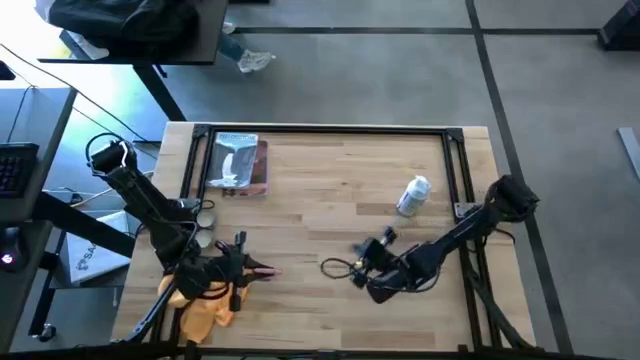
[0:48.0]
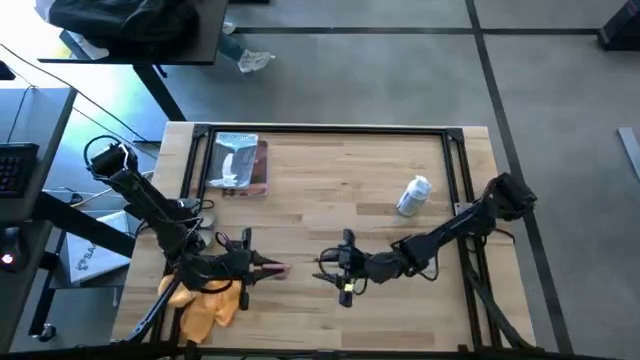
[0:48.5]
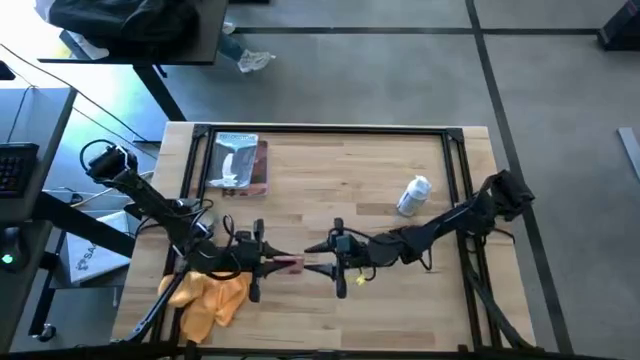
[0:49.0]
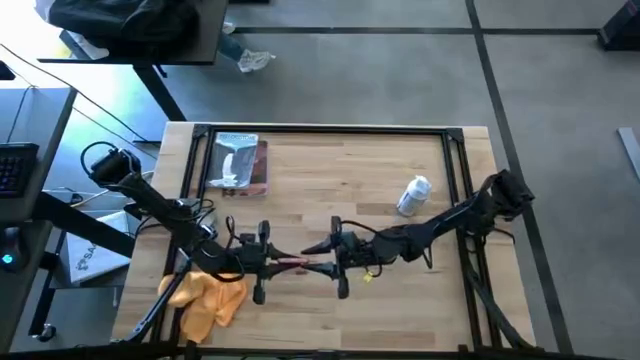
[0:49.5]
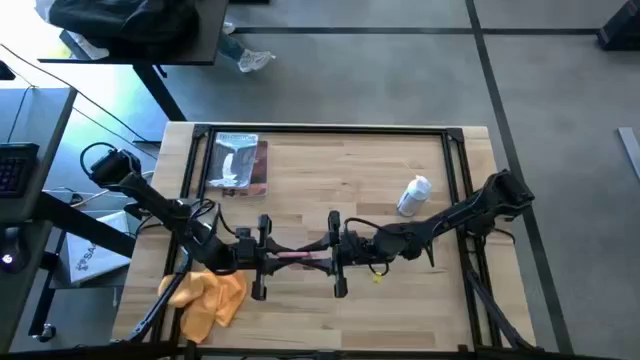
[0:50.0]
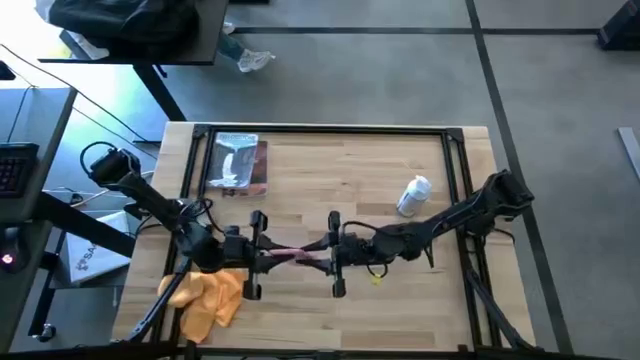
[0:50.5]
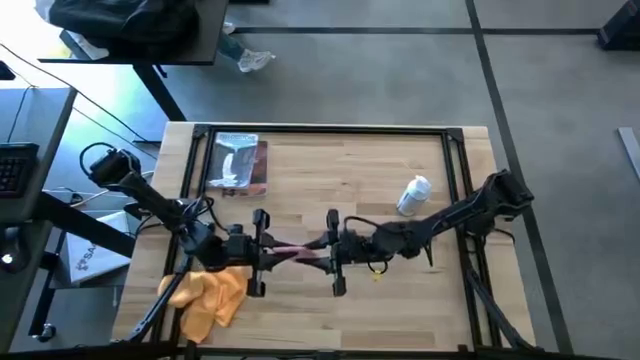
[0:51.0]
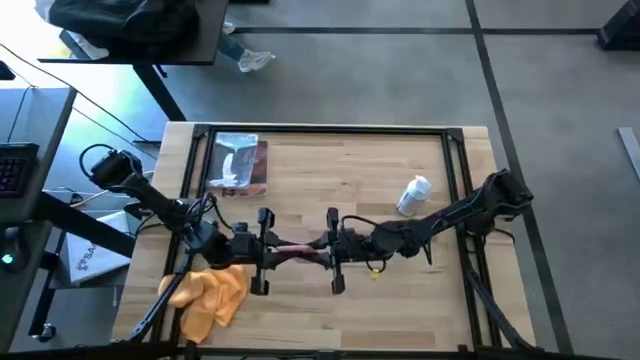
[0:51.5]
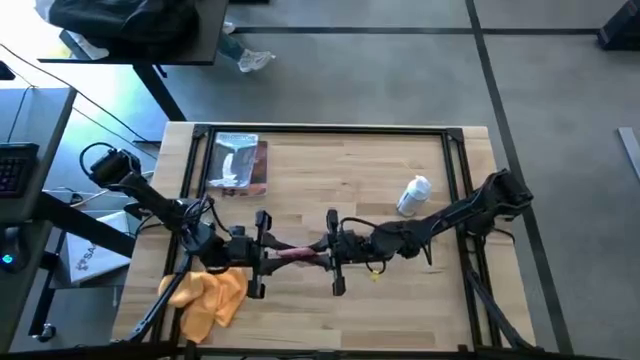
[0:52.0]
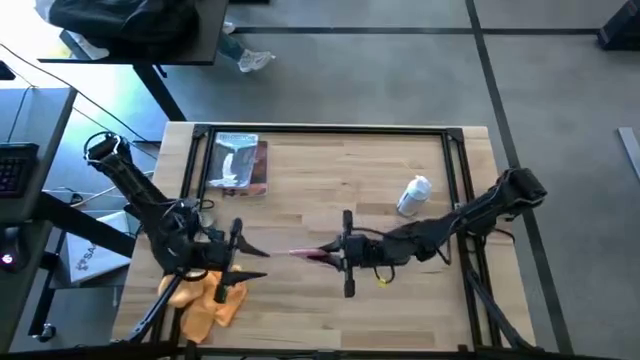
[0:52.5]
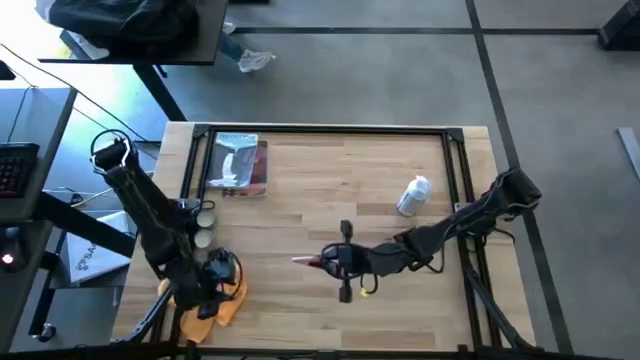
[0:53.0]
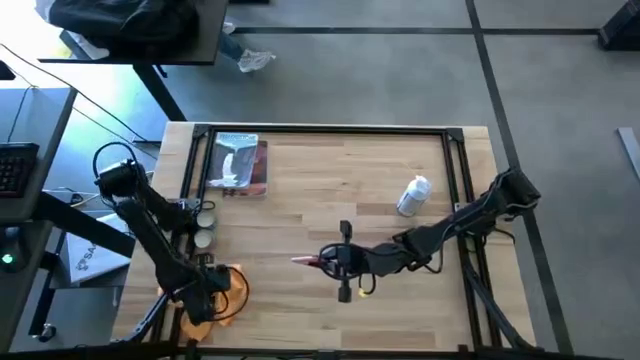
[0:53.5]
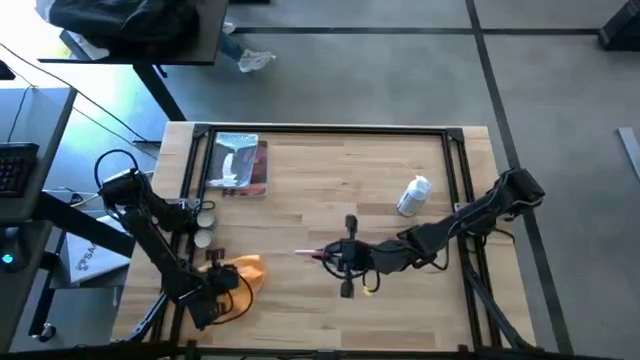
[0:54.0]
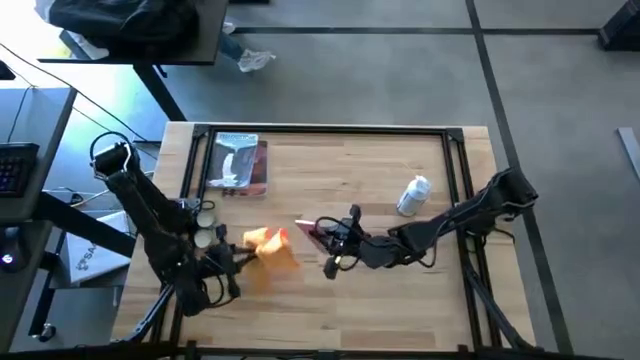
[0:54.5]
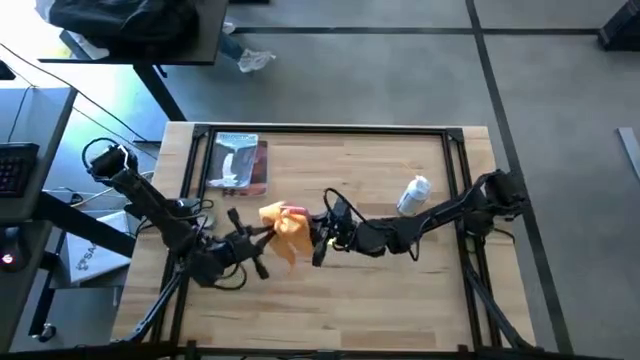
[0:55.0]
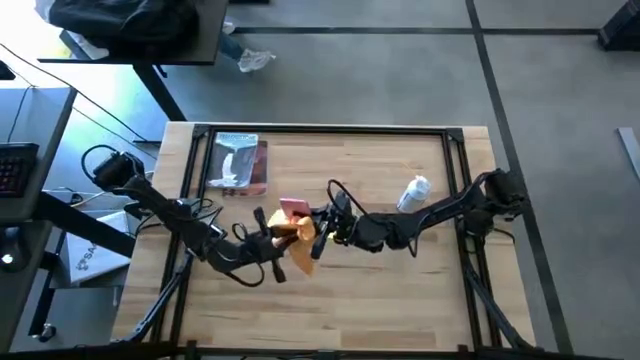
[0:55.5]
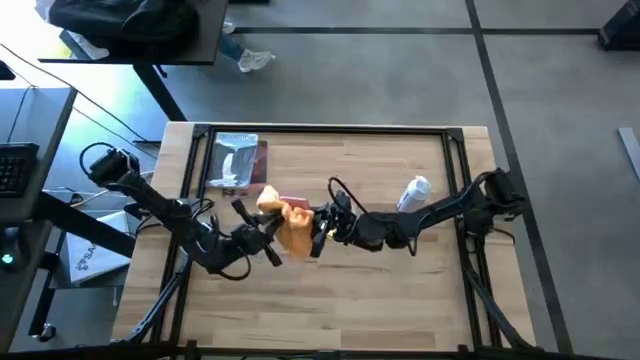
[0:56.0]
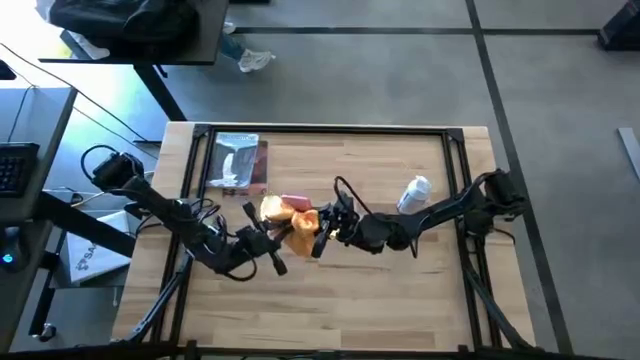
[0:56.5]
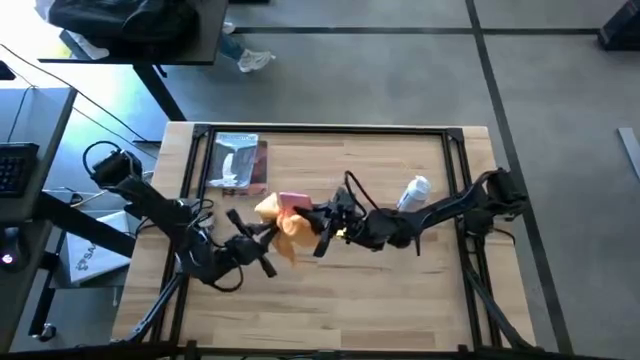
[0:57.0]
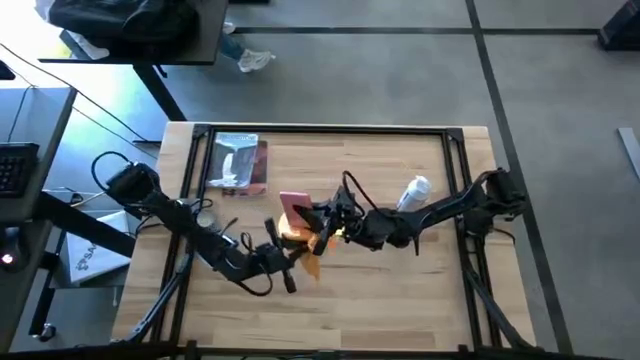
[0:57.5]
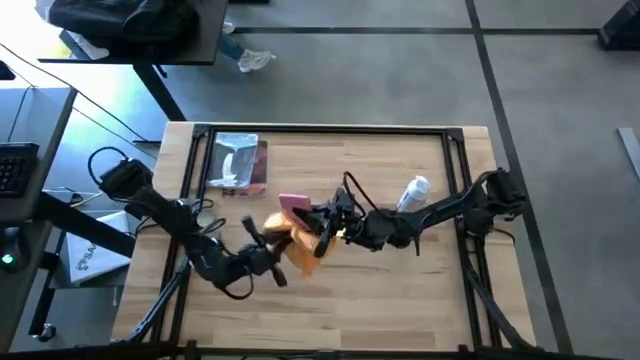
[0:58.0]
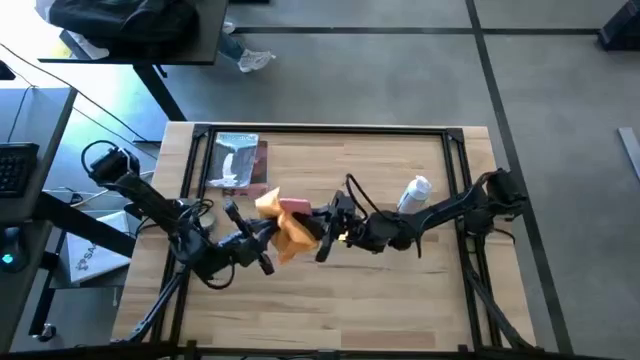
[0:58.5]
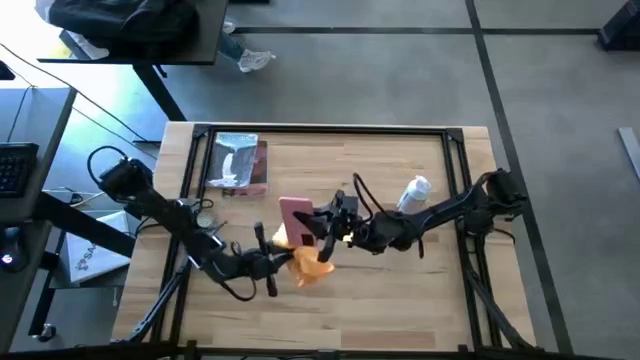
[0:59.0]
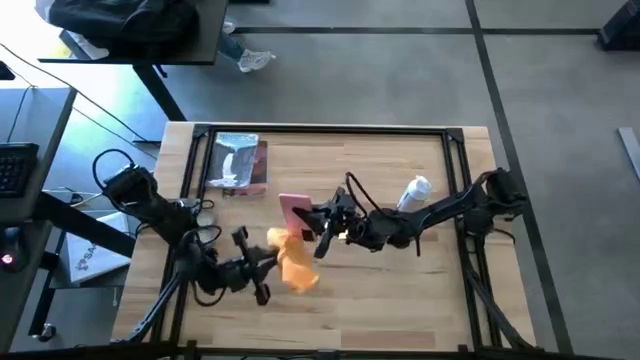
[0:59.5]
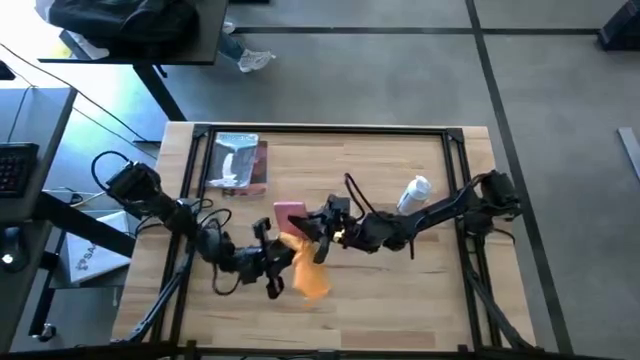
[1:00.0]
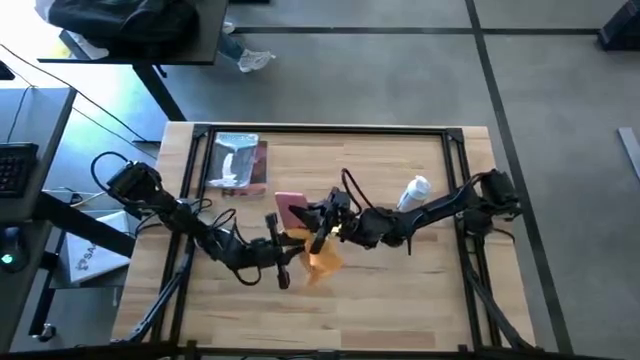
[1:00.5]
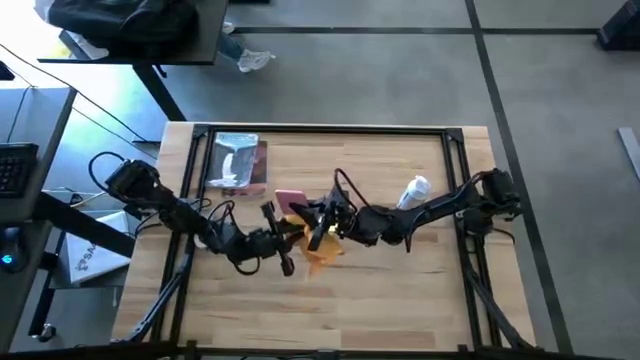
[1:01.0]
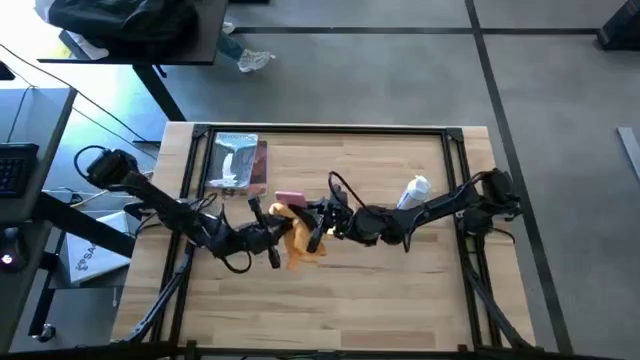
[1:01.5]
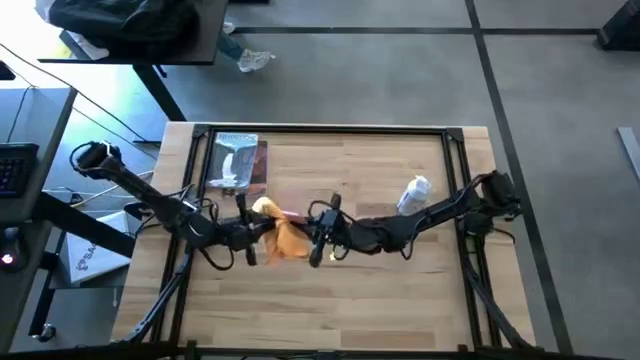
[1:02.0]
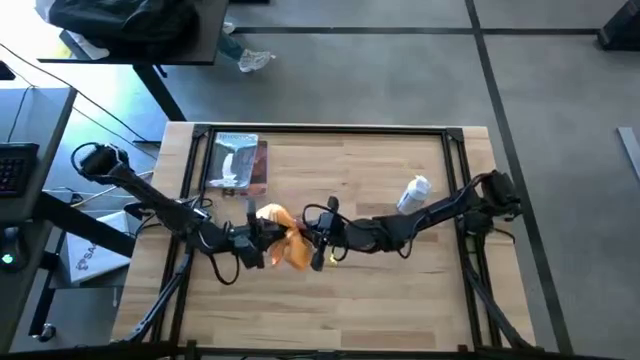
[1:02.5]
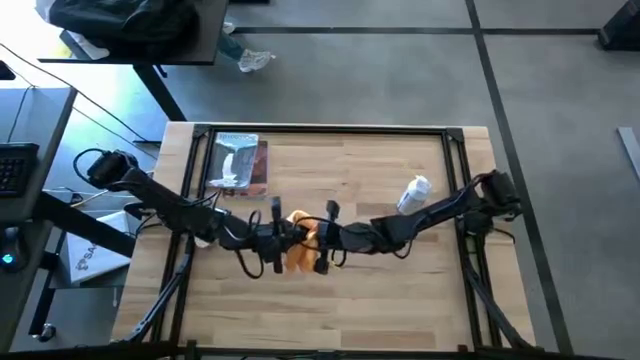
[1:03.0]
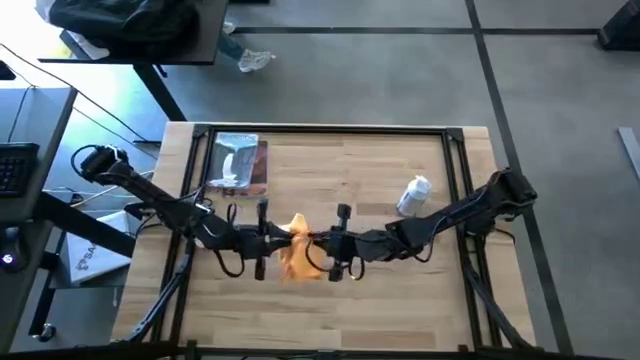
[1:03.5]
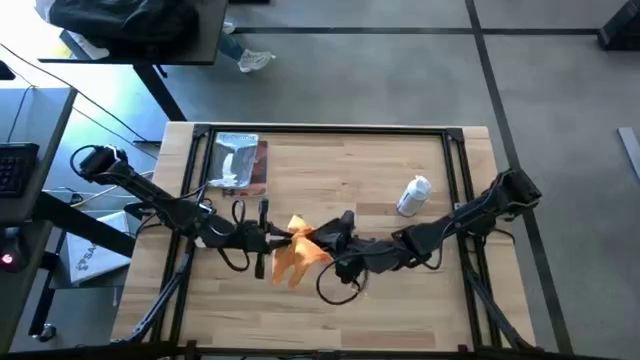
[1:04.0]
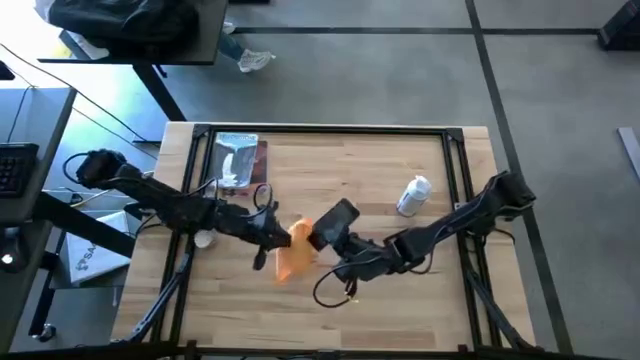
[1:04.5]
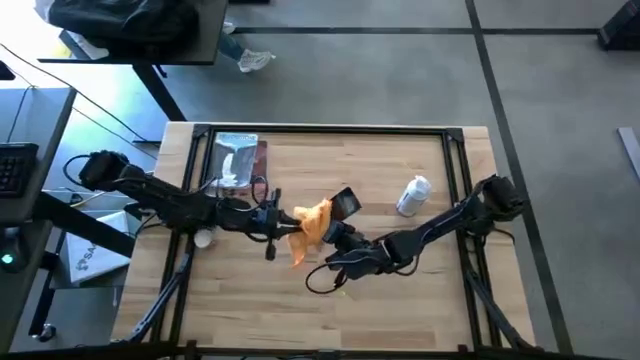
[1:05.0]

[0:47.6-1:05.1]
Task: Apply microfiber cloth
Wipe the front and back of the cellphone with the yellow microfiber cloth
